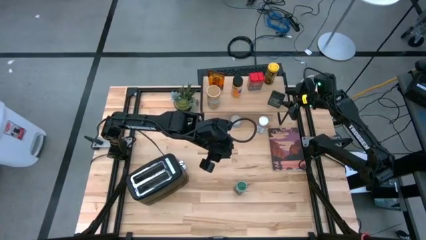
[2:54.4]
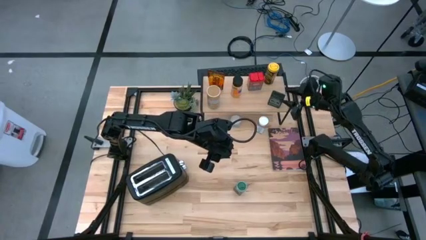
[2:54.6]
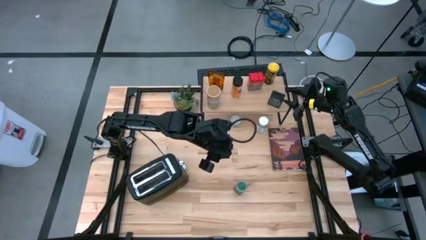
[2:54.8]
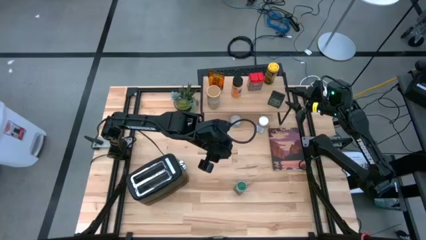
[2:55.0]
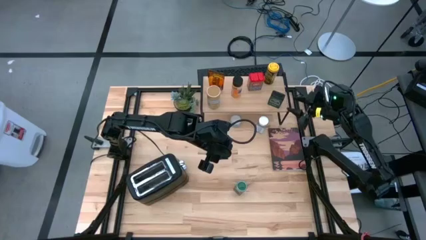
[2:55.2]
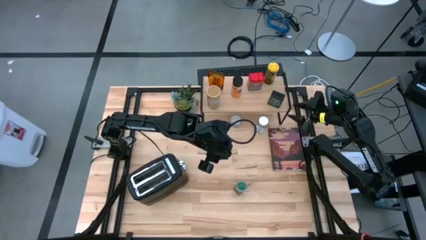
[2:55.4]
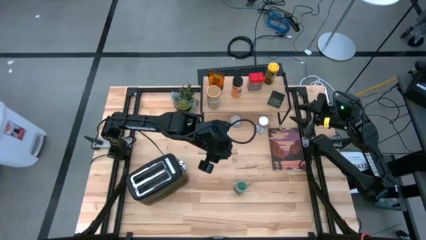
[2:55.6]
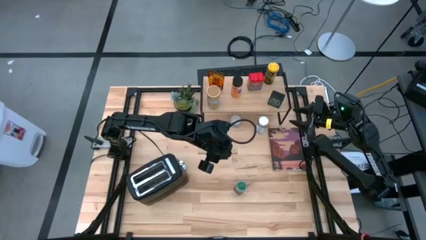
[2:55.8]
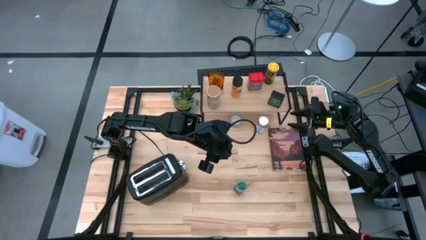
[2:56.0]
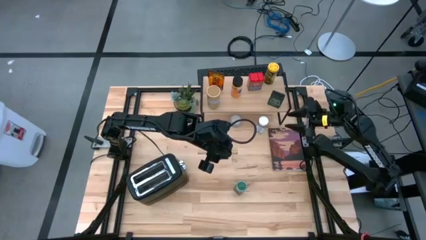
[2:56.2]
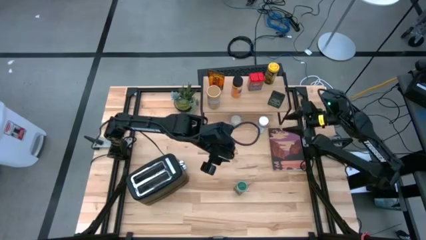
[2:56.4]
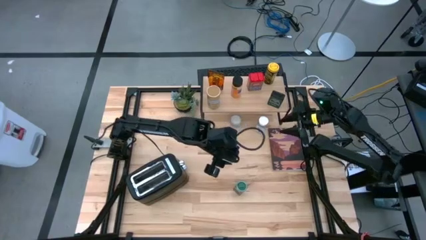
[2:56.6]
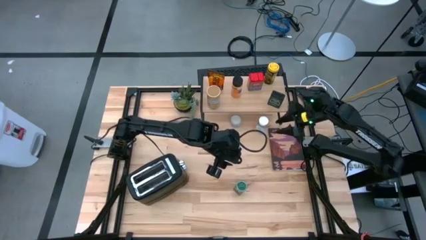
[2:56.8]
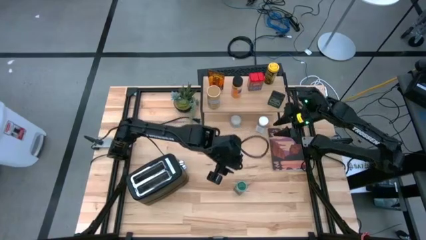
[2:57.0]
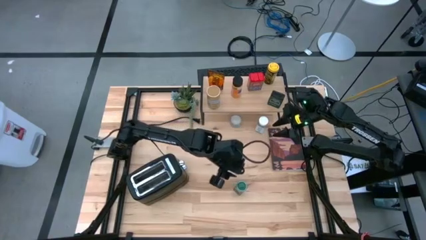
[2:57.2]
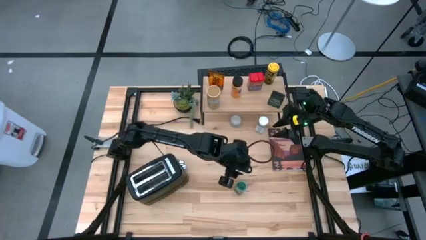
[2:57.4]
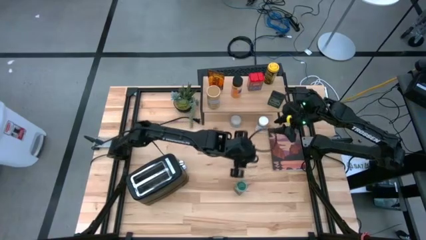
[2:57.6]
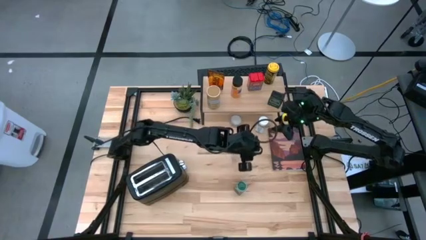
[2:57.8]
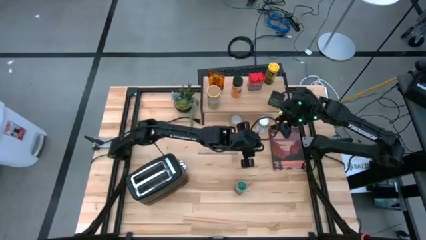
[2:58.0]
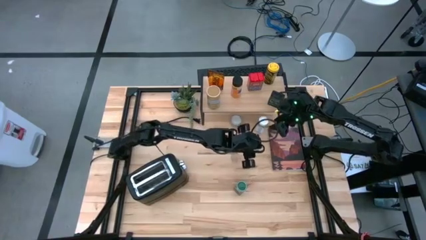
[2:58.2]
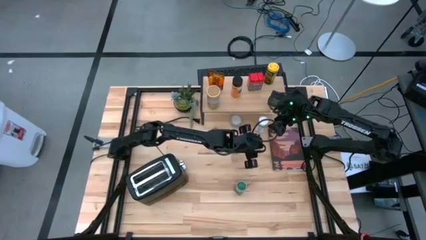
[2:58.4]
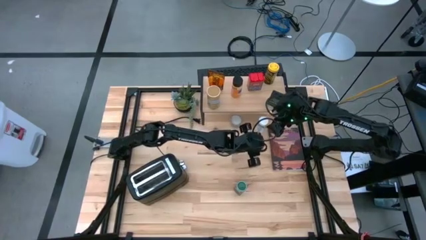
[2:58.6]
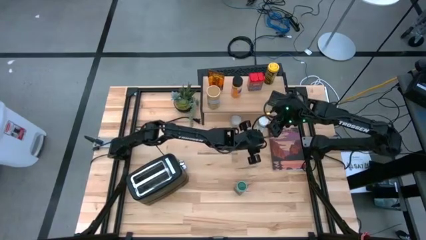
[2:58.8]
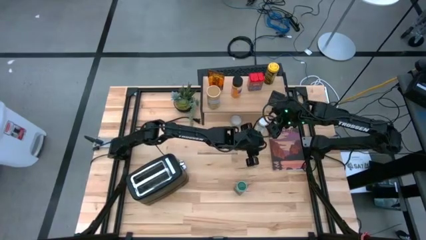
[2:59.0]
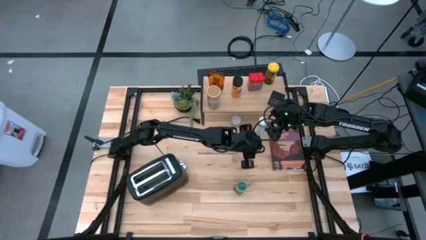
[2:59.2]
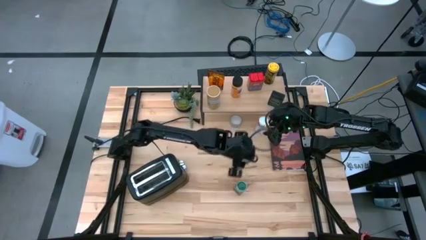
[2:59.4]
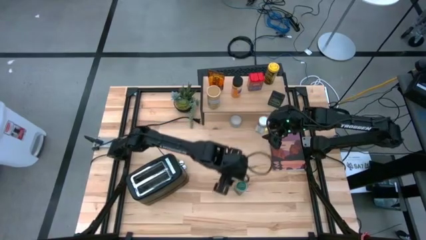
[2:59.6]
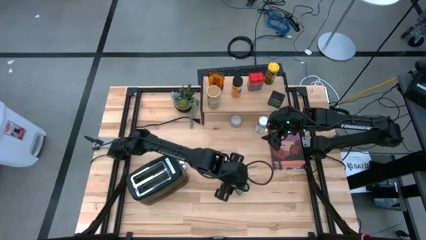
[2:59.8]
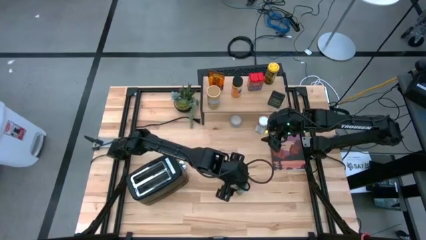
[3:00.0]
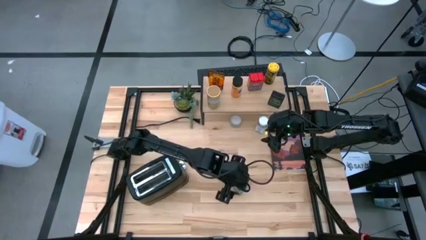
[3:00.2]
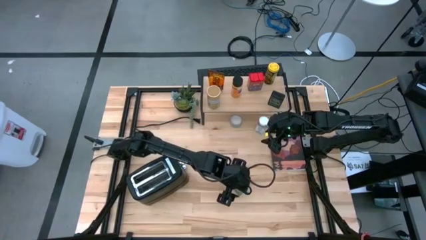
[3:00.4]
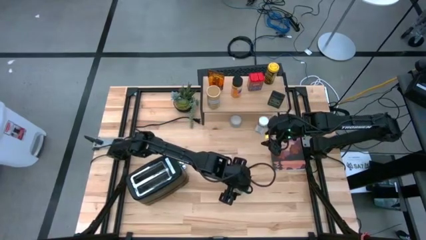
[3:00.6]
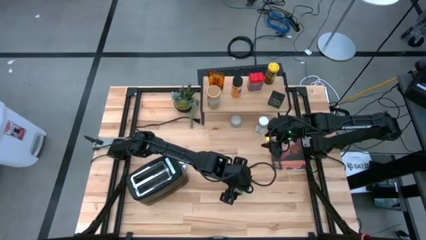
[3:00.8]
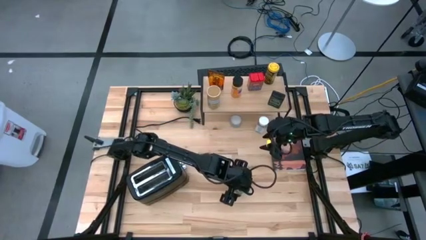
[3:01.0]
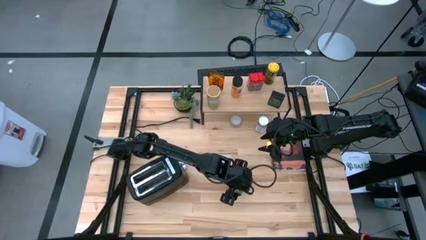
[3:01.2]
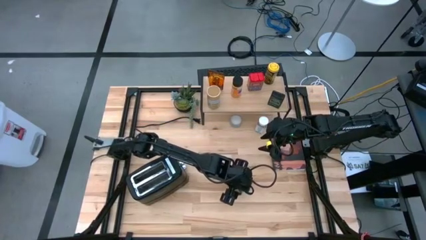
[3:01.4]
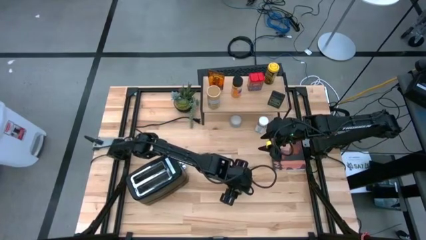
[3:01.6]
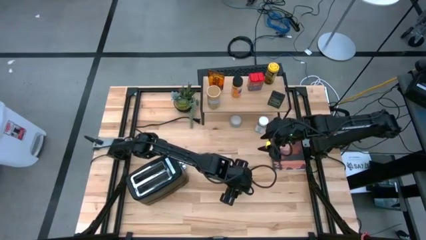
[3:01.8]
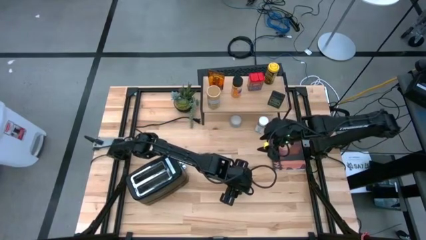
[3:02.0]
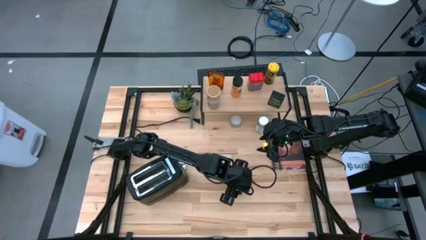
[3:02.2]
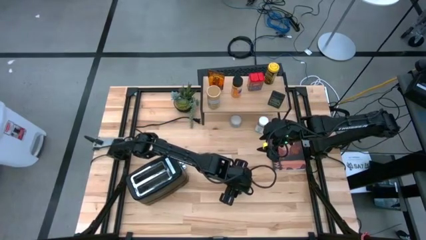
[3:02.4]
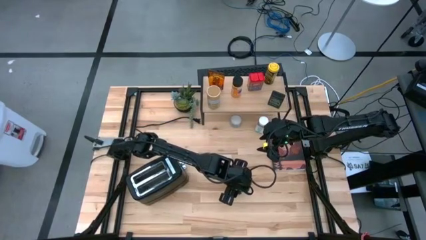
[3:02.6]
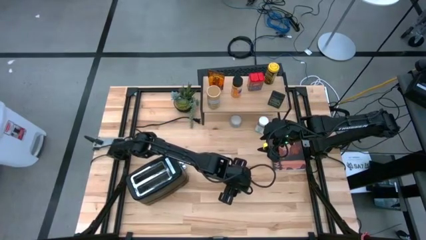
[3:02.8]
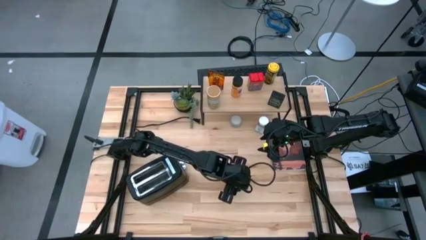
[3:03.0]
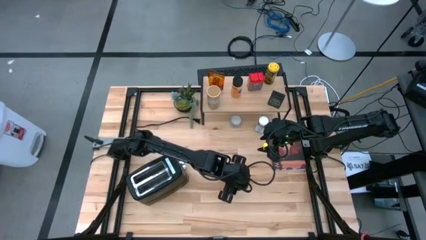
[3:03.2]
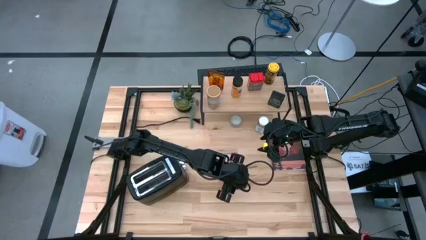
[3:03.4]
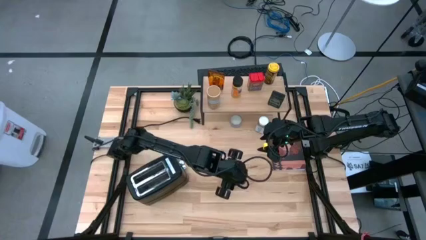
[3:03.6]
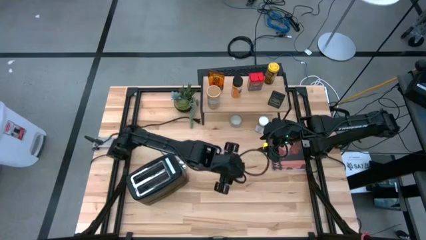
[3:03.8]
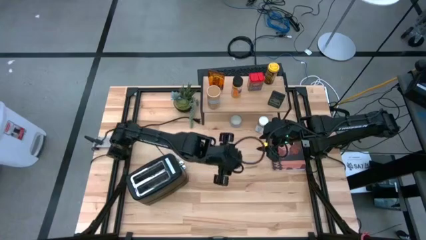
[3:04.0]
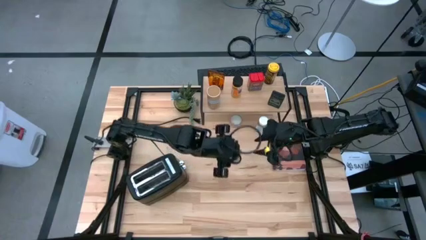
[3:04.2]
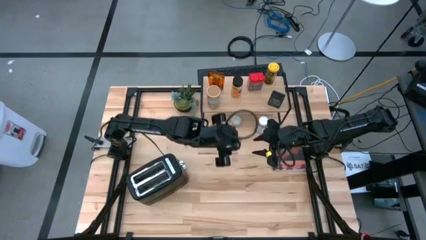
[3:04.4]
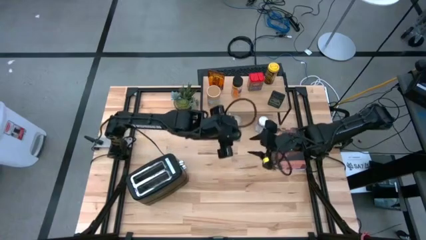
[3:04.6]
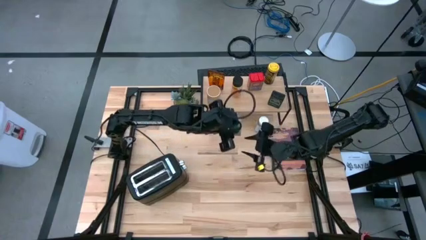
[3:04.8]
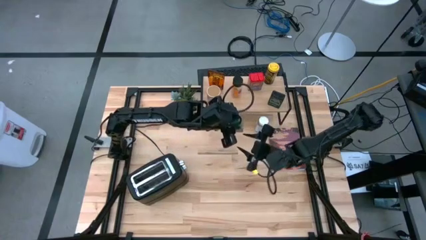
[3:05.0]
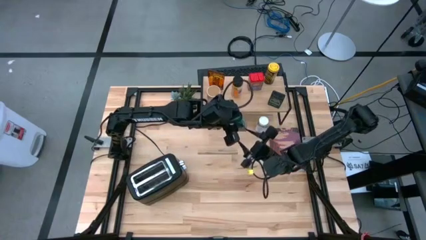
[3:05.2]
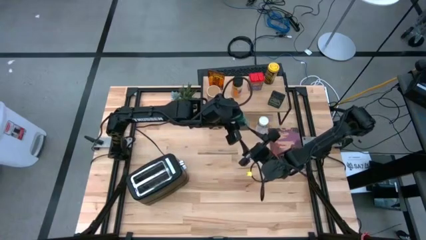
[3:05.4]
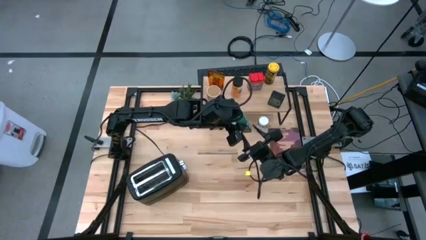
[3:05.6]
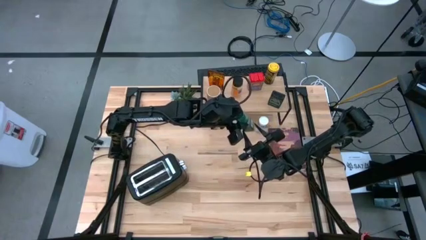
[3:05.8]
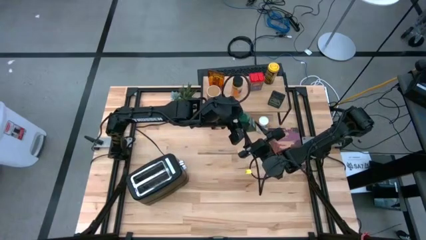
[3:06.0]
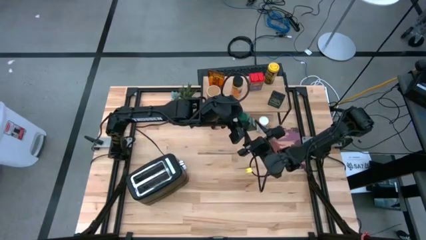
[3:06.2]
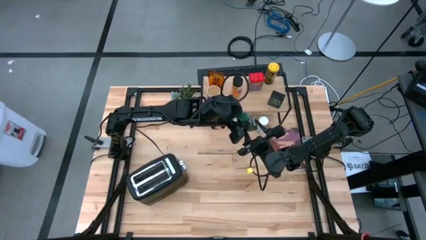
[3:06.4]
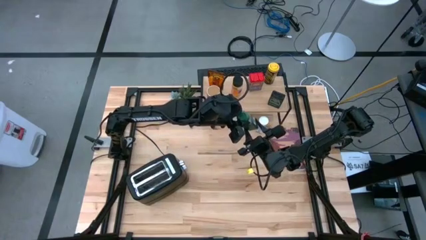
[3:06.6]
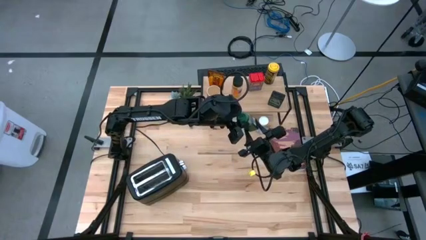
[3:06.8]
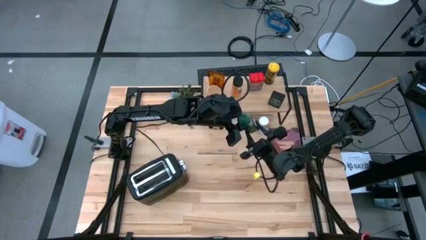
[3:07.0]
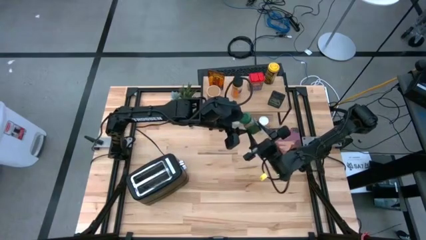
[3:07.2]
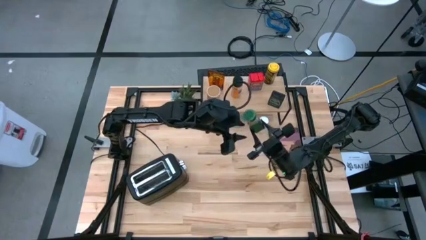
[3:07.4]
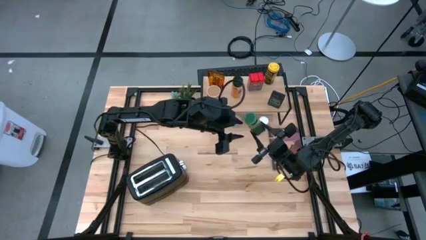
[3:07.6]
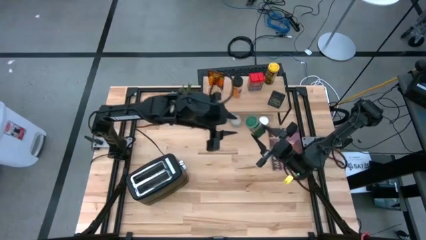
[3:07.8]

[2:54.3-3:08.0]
Task: Shelf spices
Put the green seasoning bottle on the shelf

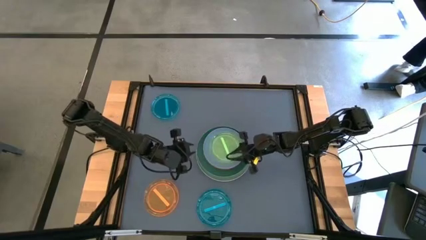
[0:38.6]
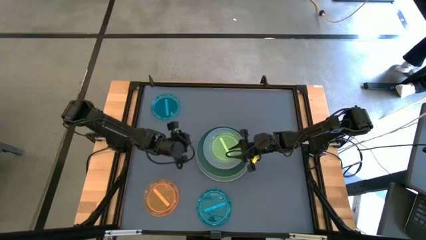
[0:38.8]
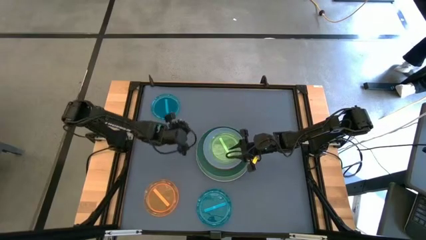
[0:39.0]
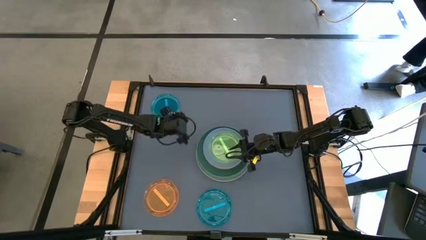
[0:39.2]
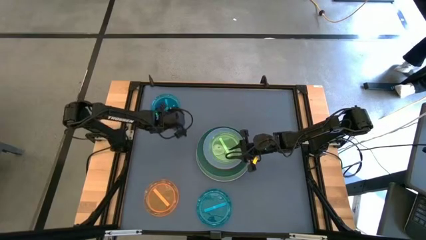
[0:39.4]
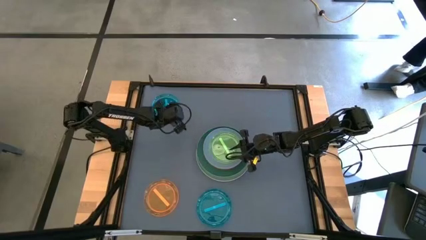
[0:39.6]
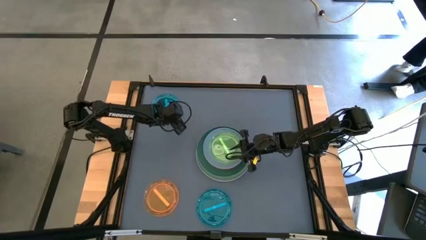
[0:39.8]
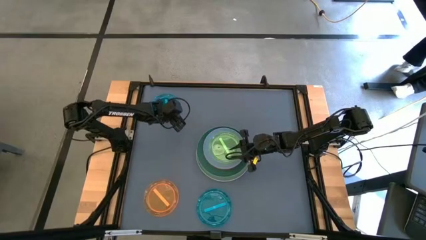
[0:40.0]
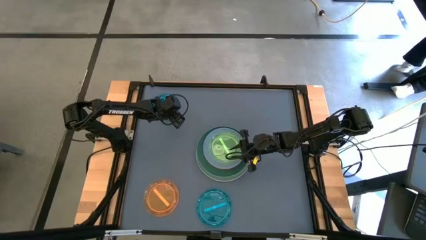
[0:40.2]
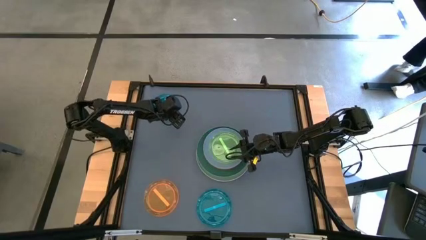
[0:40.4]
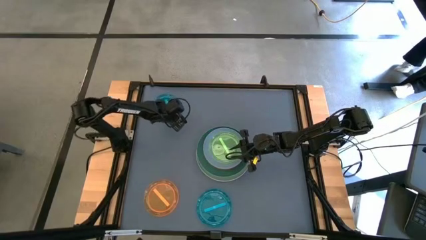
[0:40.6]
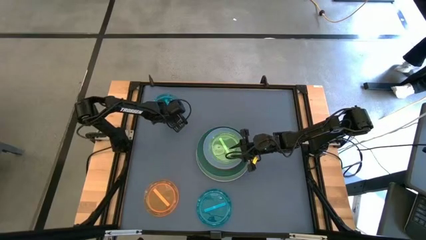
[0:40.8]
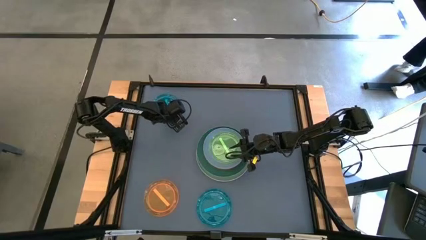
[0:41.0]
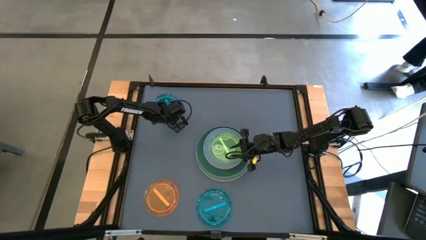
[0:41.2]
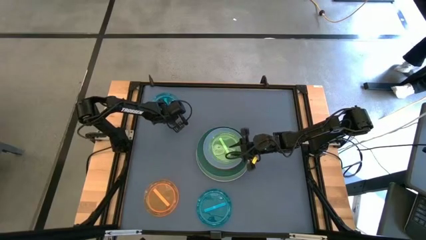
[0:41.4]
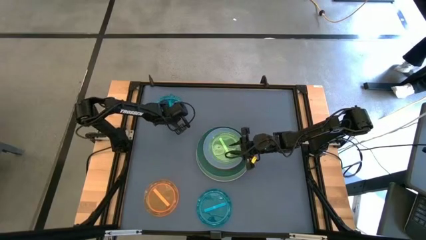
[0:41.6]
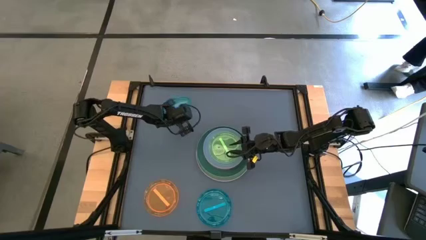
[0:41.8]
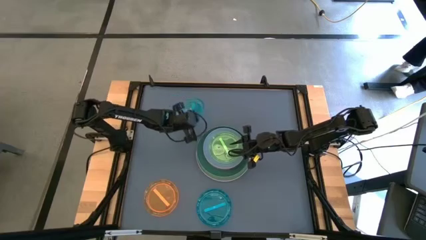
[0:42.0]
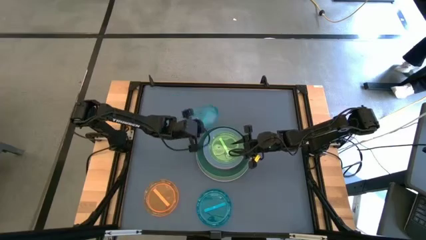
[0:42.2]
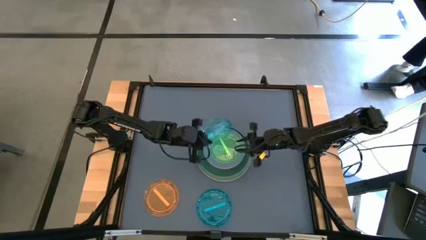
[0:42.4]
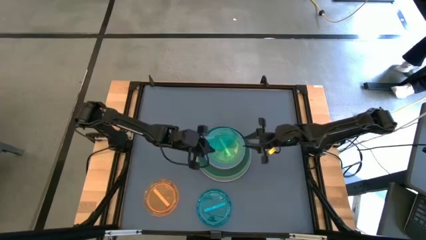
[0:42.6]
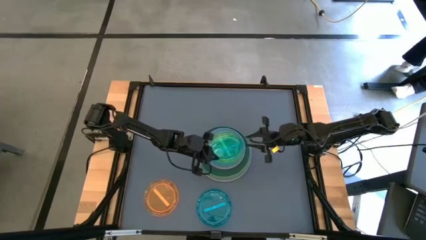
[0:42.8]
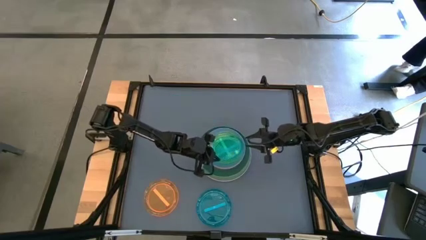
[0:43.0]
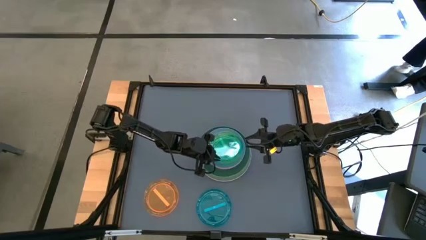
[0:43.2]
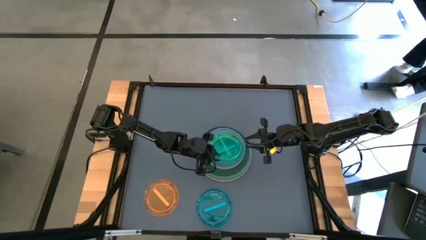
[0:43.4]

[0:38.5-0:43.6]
Task: Stack plastic plates
Stack the top light blue on top of the light green plate
